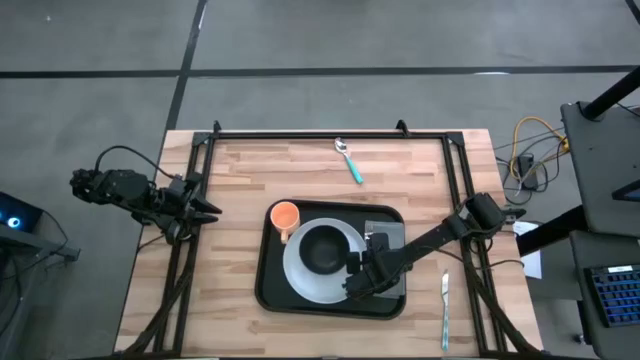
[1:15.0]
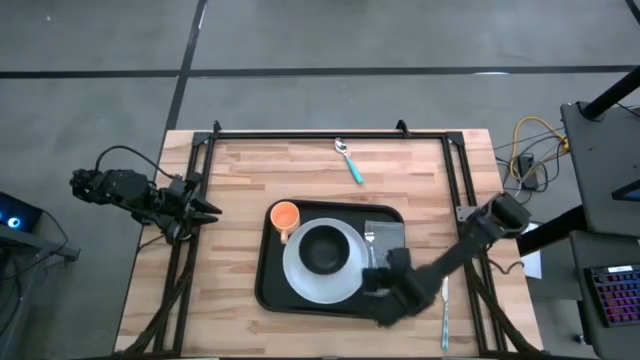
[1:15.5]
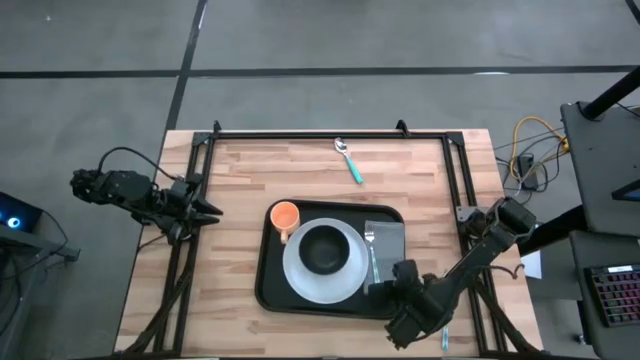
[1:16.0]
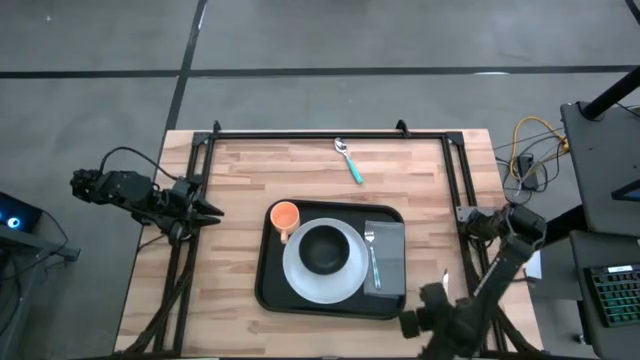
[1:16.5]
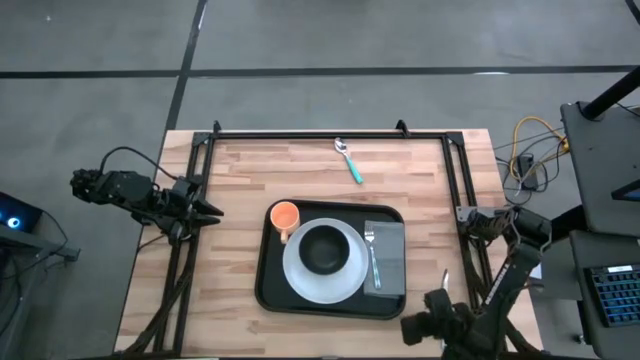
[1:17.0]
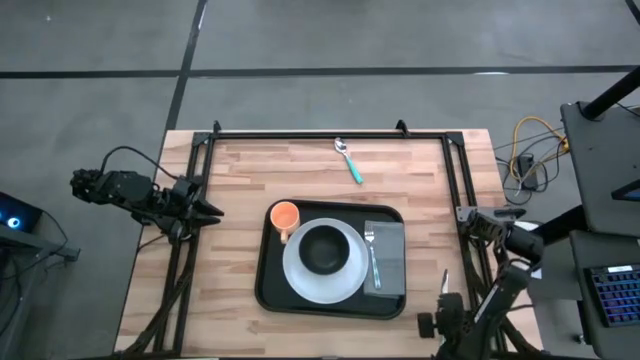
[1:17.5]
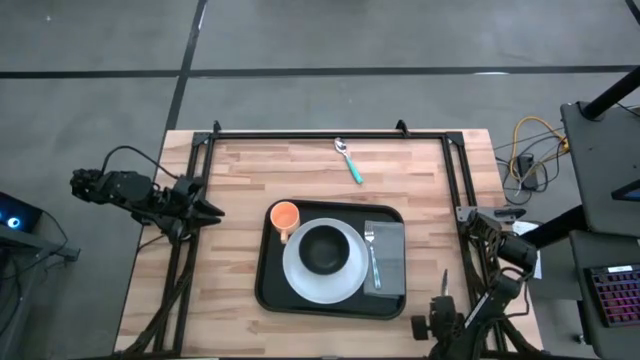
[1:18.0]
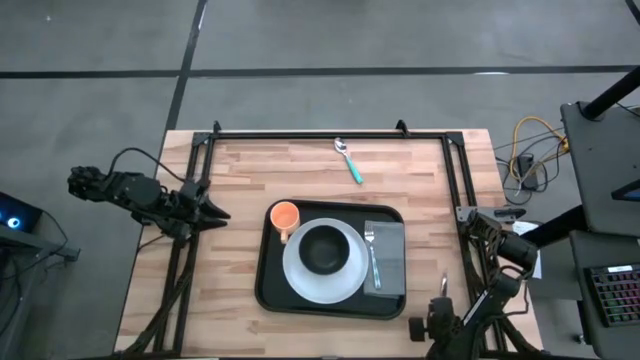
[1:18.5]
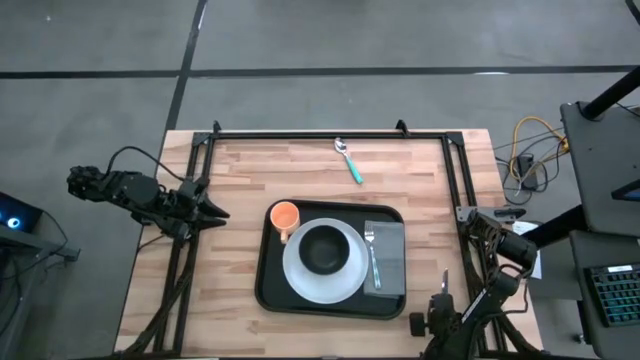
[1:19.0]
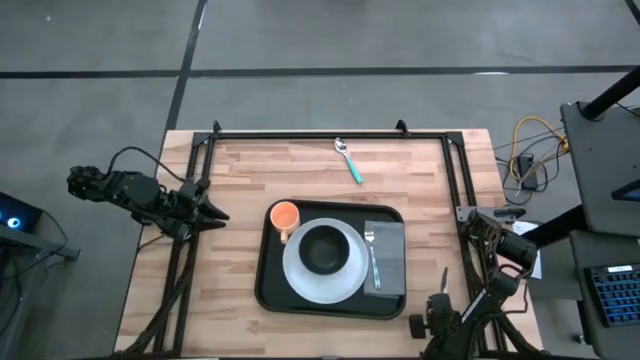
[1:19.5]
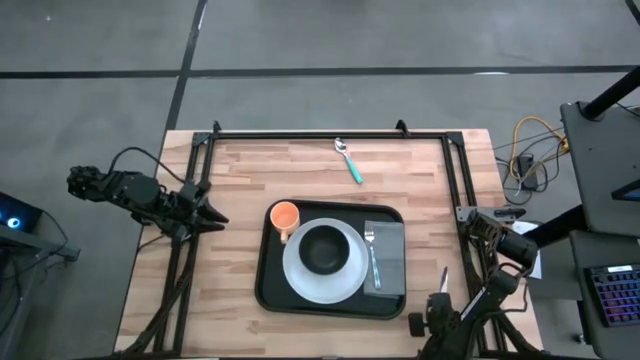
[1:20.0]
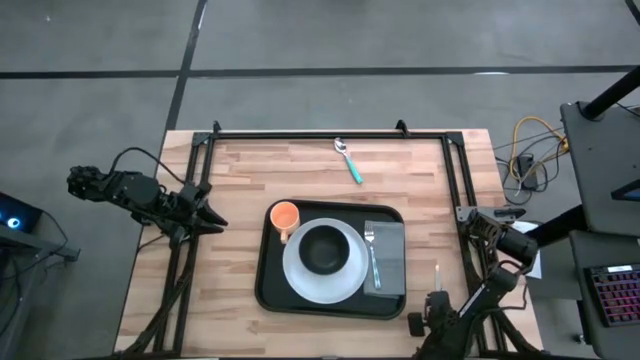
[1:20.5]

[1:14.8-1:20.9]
Task: Set up tray
Put the green knife on top of the gray napkin to the right of the green fork

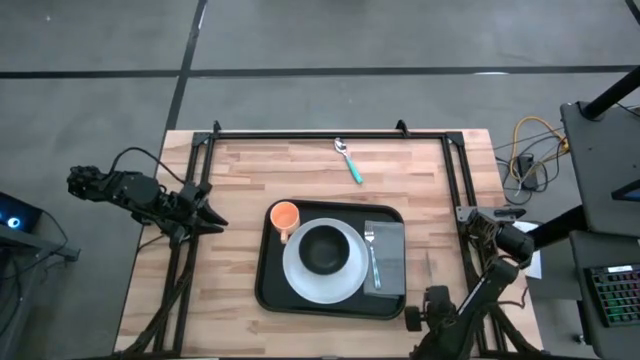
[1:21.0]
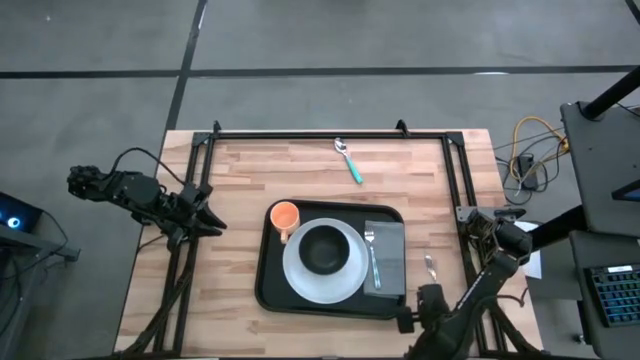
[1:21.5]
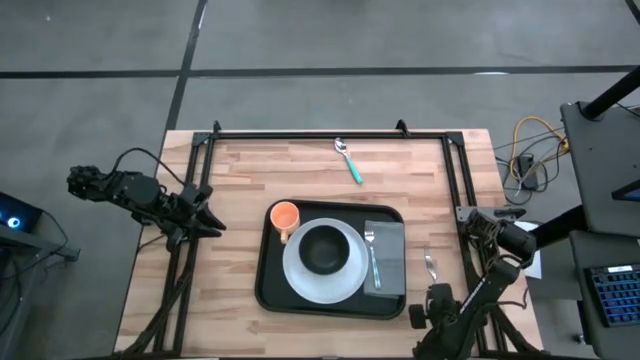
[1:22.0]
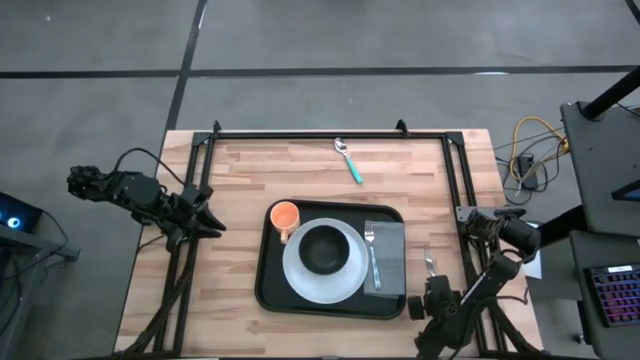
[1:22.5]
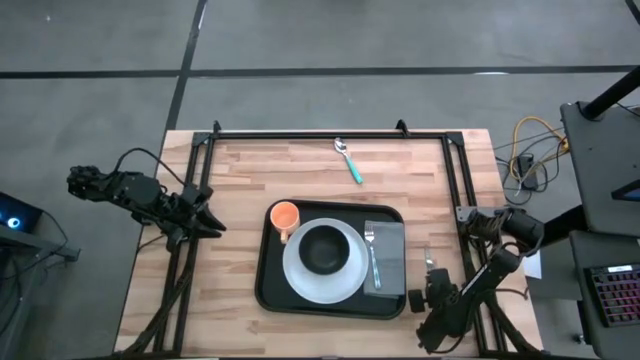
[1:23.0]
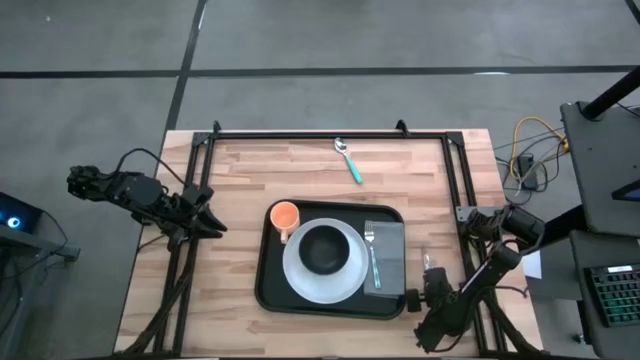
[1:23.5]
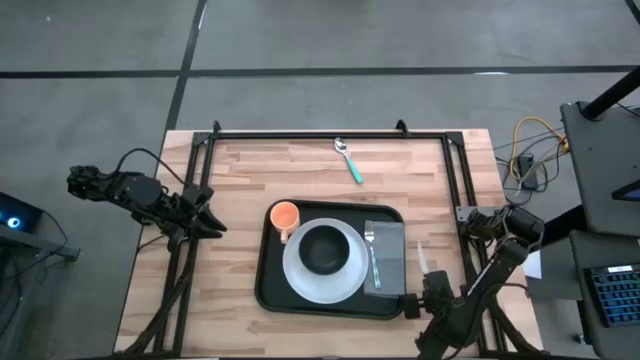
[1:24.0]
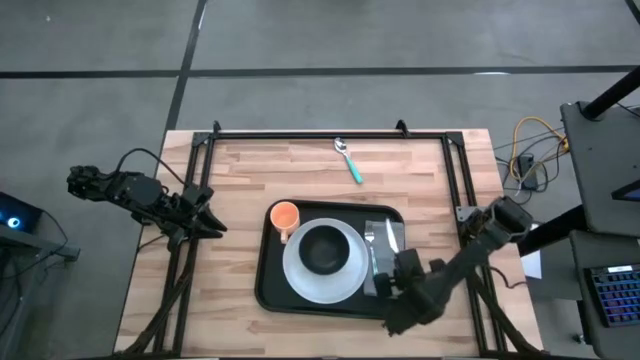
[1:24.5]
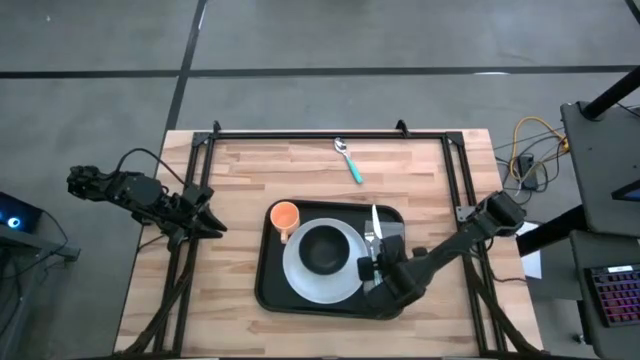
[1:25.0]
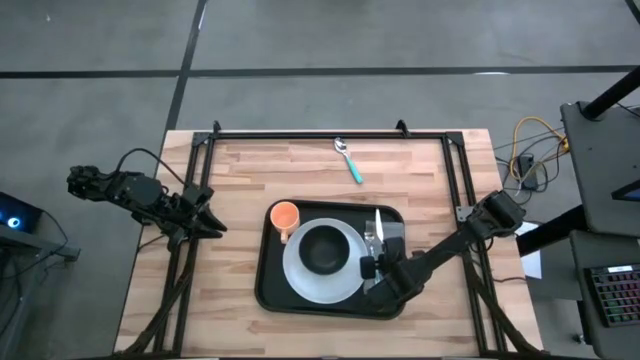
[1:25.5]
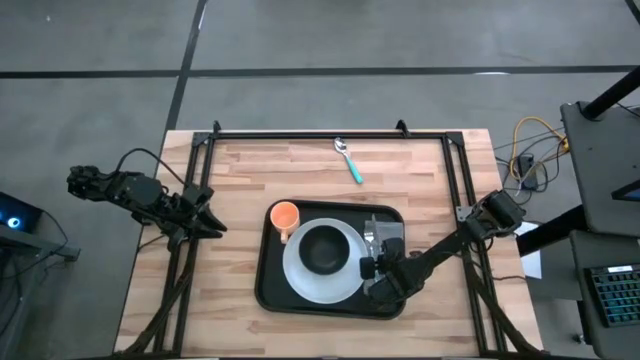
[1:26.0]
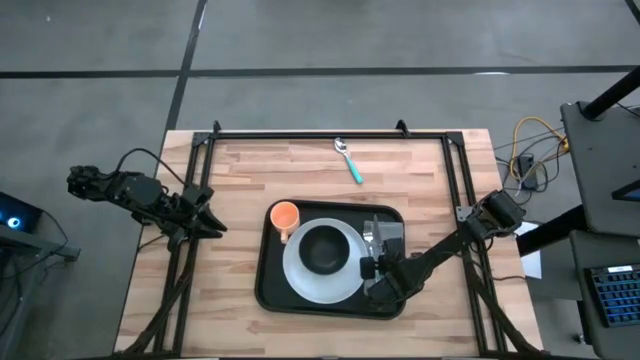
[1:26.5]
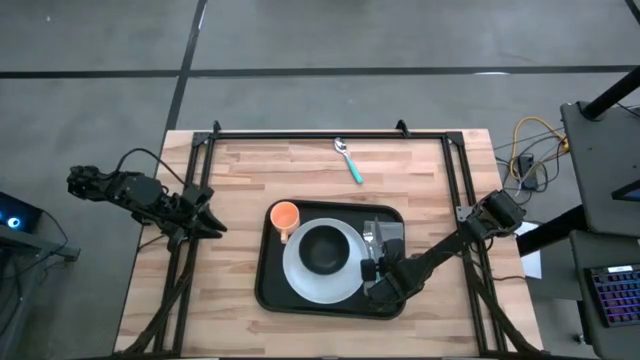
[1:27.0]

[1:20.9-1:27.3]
Put the green knife on top of the gray napkin to the right of the green fork

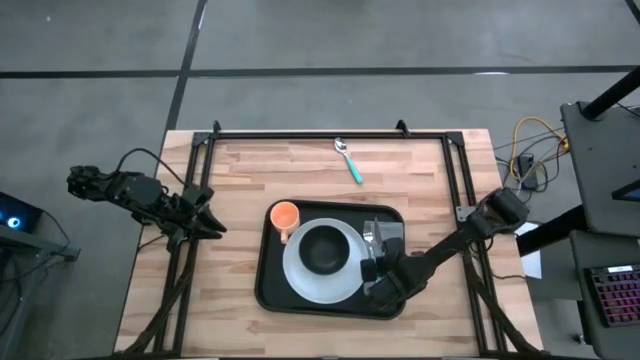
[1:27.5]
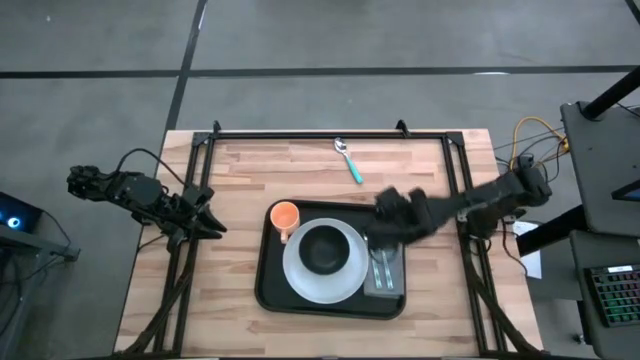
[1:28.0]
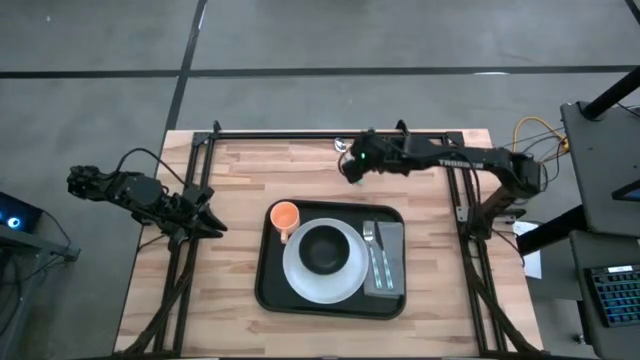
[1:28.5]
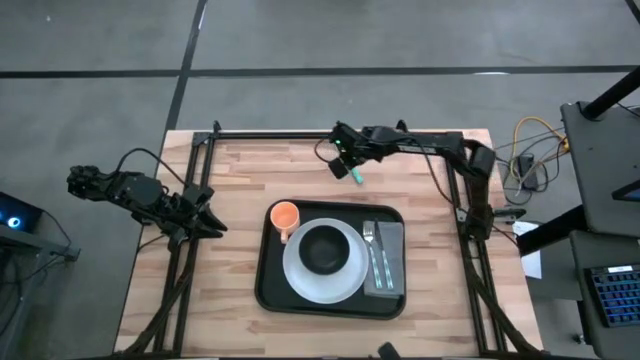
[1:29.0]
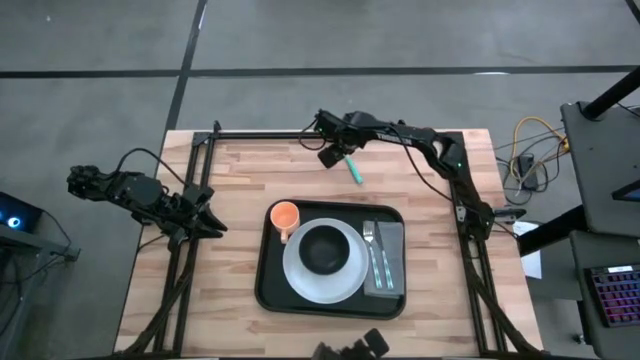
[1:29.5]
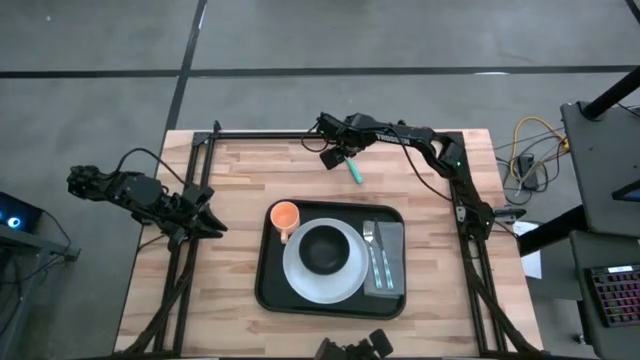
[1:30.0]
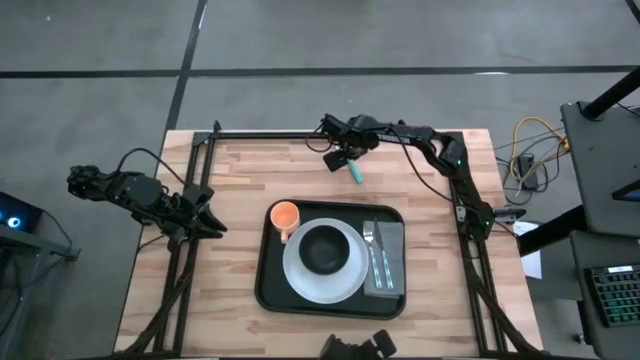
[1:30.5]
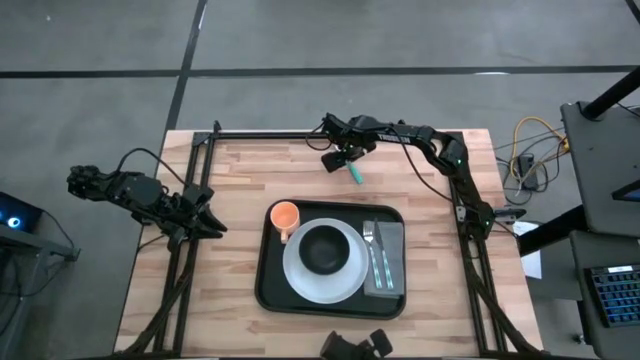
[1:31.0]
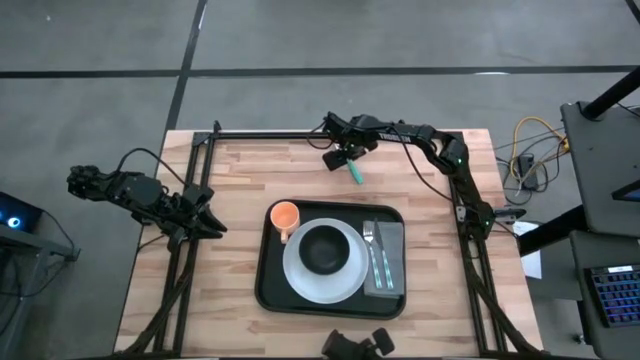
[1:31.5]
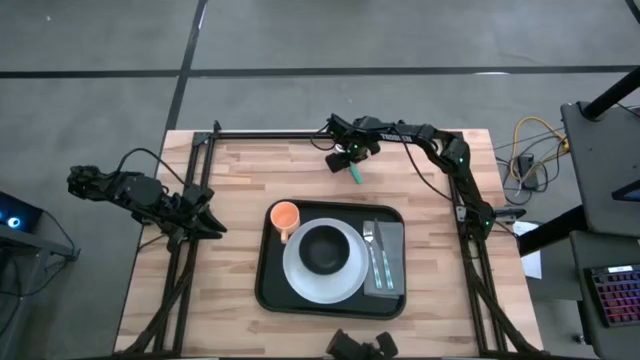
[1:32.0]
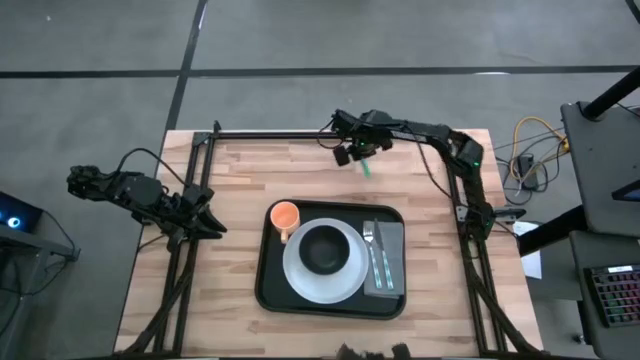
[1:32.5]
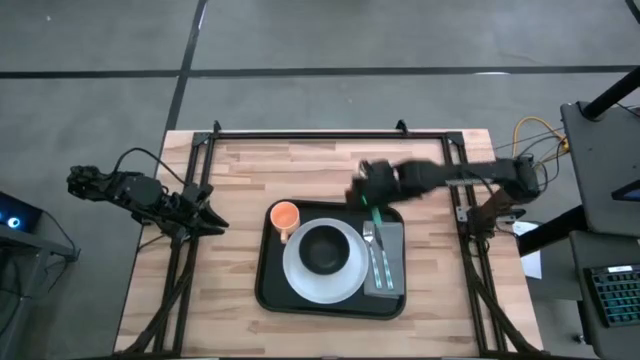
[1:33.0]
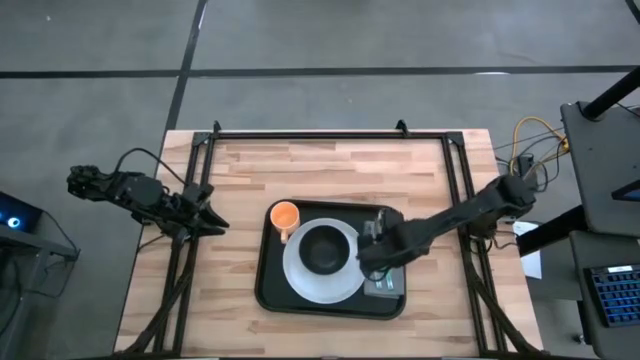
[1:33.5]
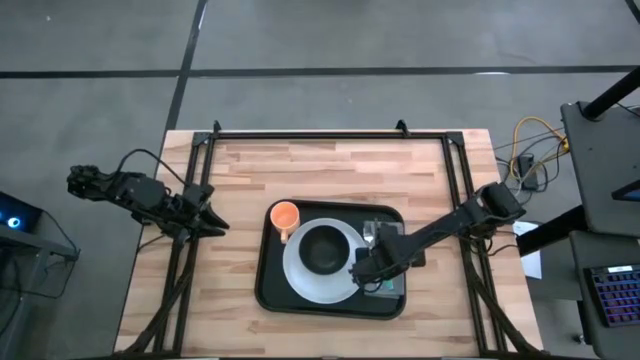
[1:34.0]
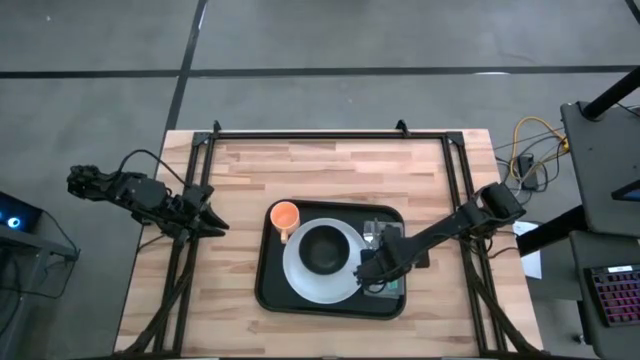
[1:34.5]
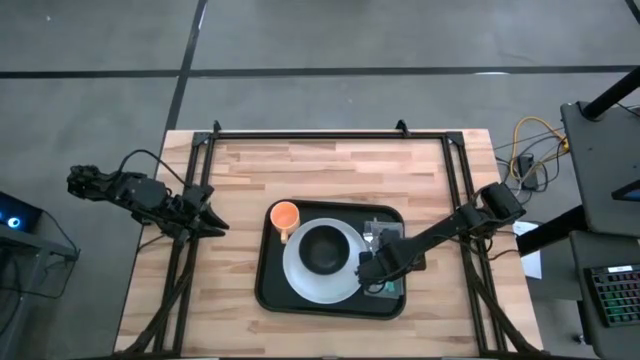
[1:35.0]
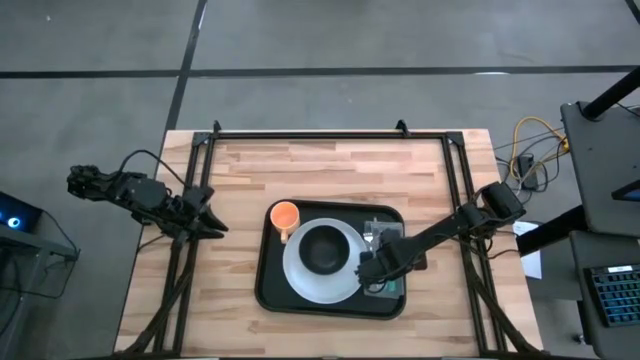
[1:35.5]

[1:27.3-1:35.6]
Put the green spoon on top of the gray napkin to the right of the green knife

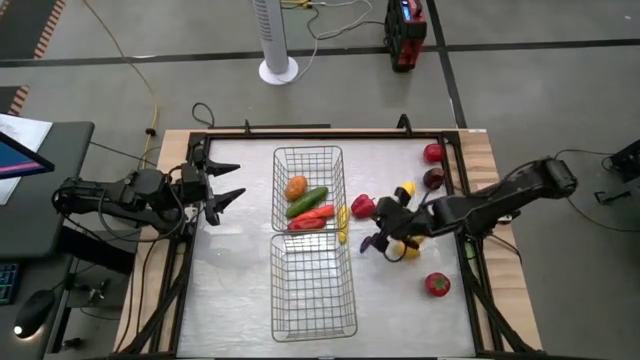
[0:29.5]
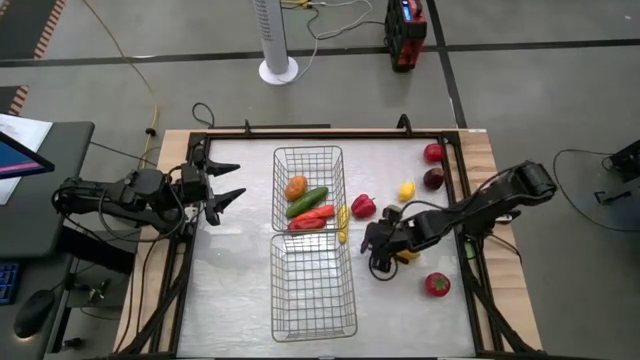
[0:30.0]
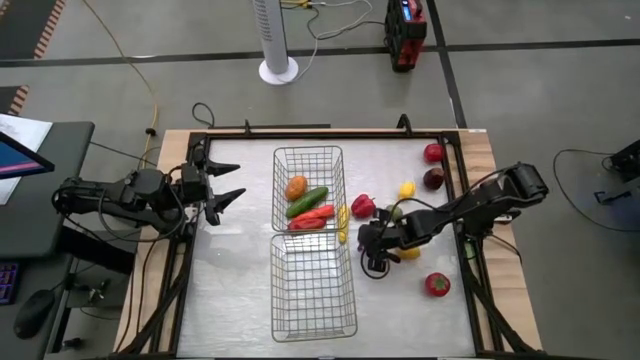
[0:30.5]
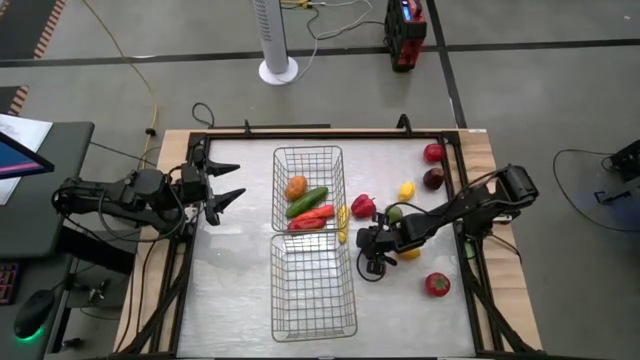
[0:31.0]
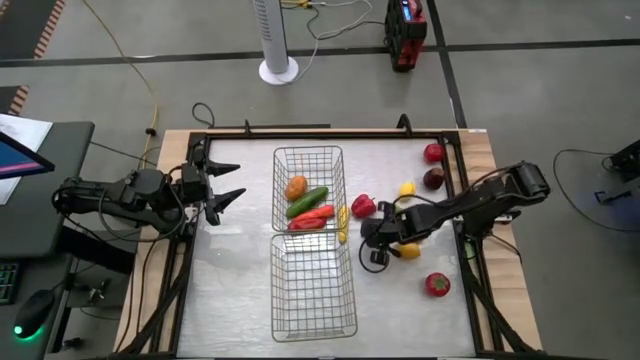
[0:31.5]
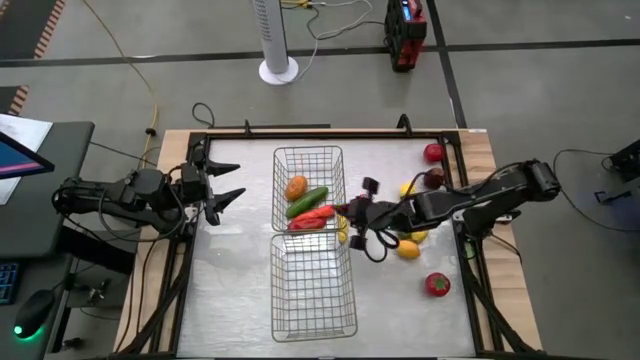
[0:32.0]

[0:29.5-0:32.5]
Task: Sort produce into baskets
Put the eggplant into the top wire basket
